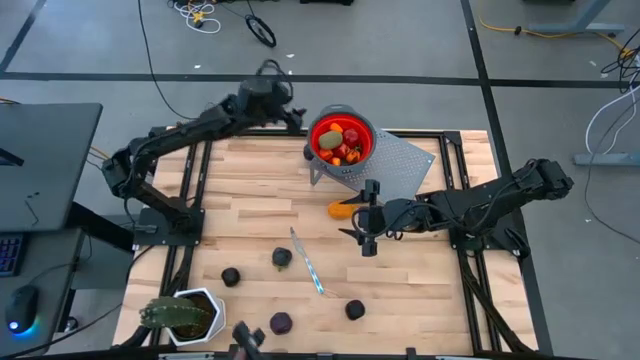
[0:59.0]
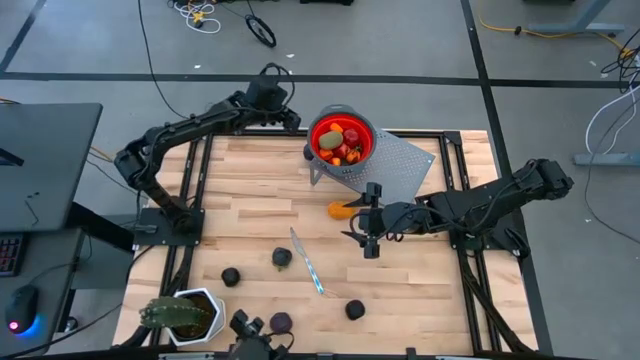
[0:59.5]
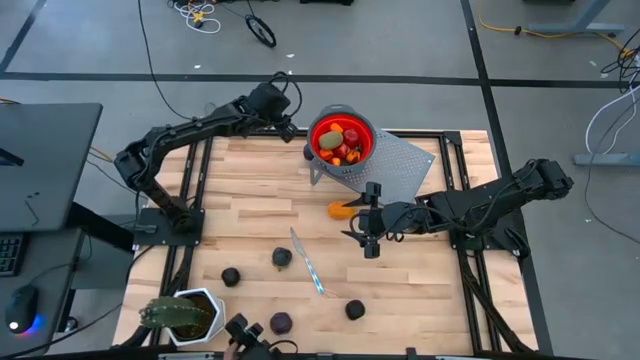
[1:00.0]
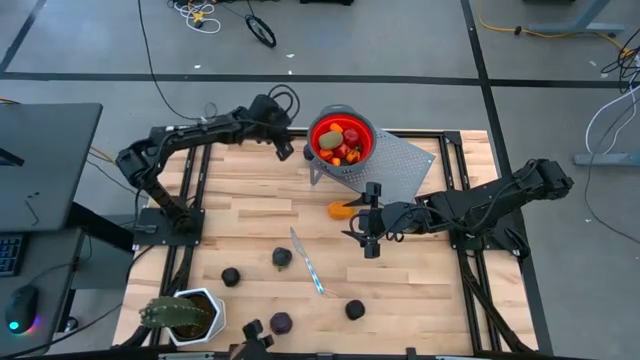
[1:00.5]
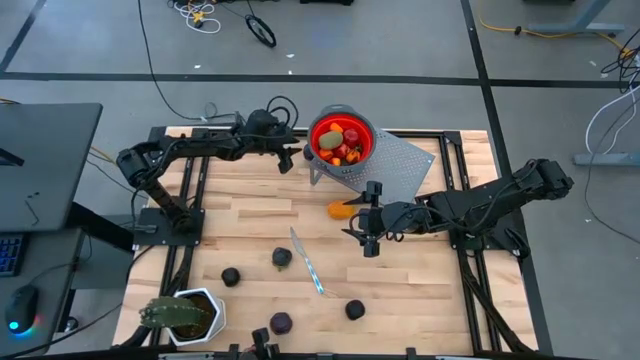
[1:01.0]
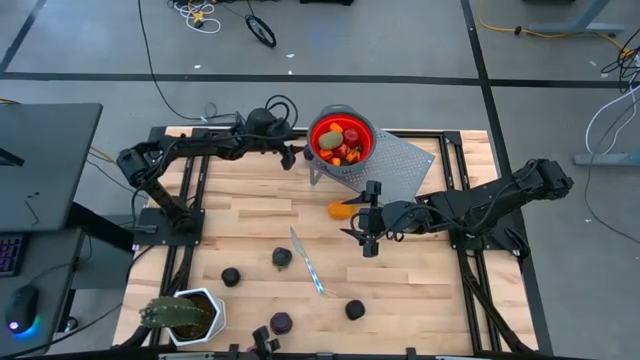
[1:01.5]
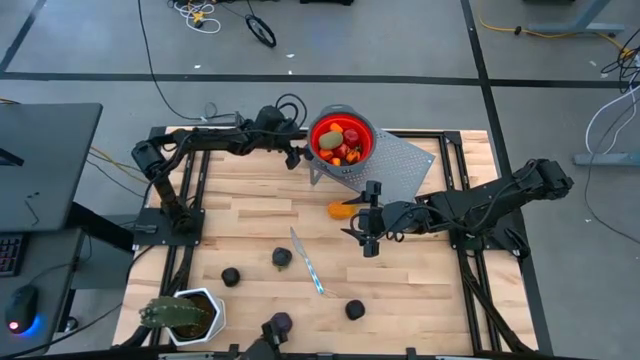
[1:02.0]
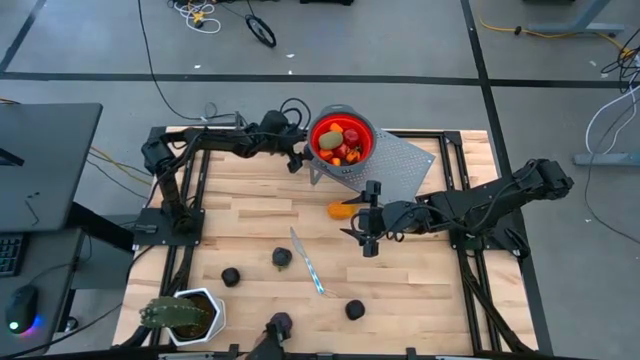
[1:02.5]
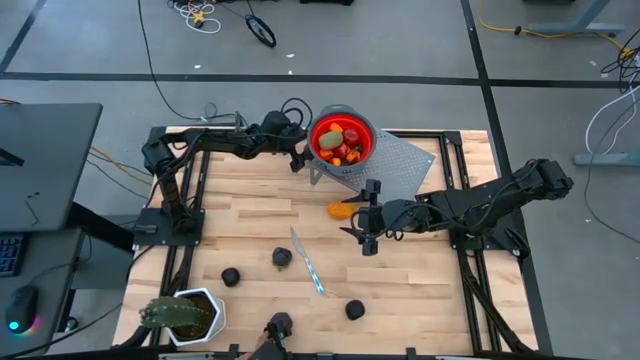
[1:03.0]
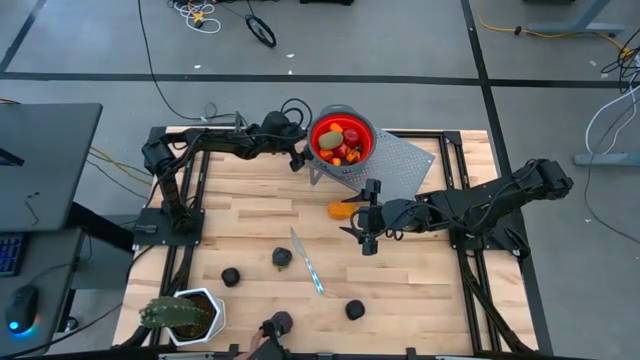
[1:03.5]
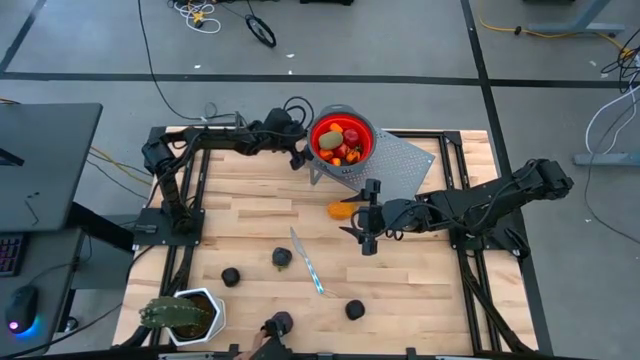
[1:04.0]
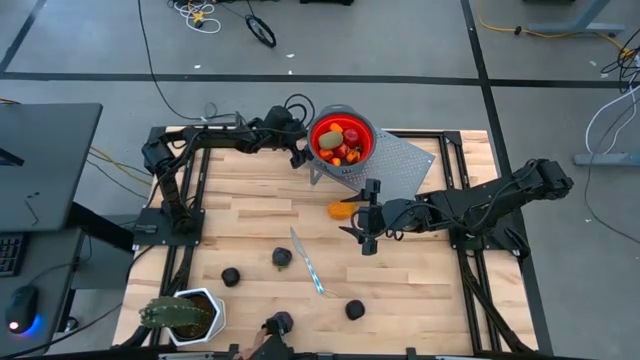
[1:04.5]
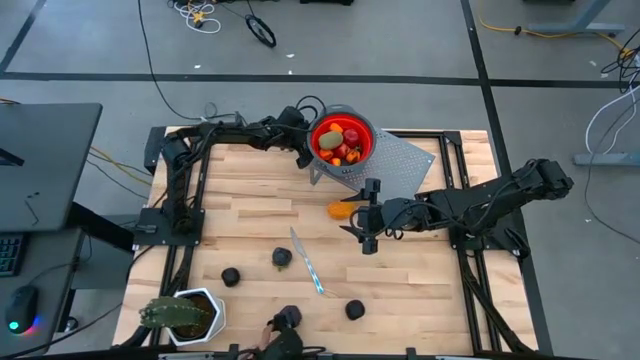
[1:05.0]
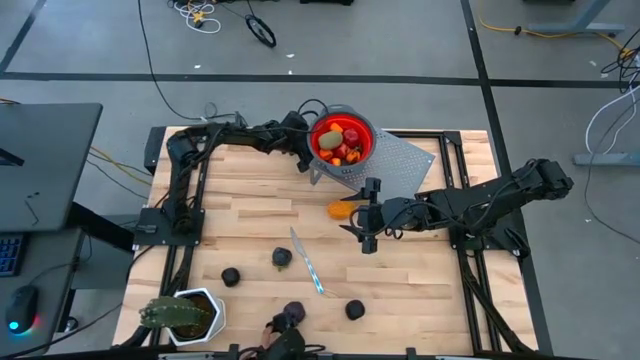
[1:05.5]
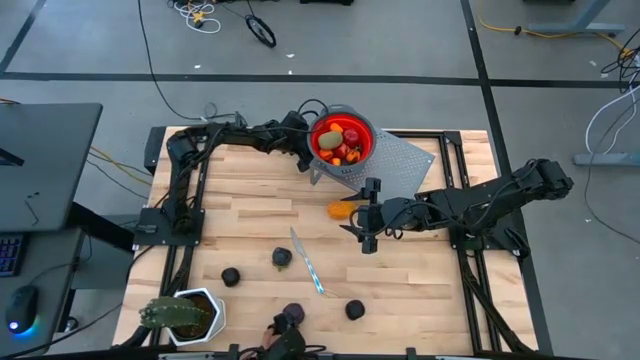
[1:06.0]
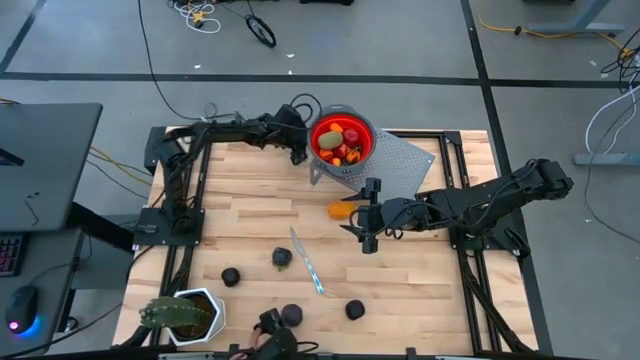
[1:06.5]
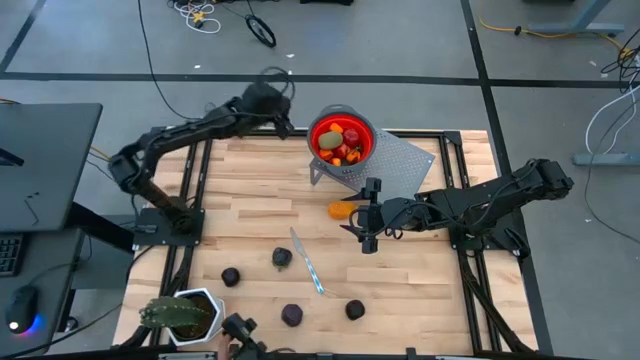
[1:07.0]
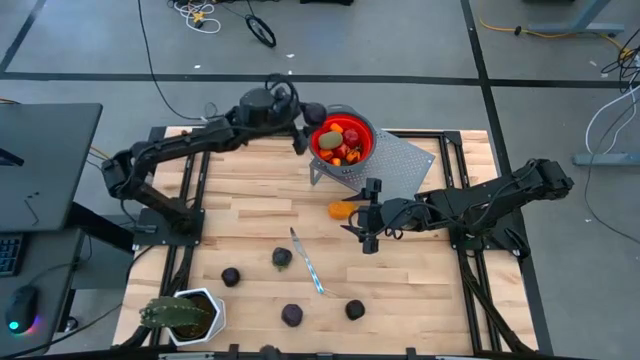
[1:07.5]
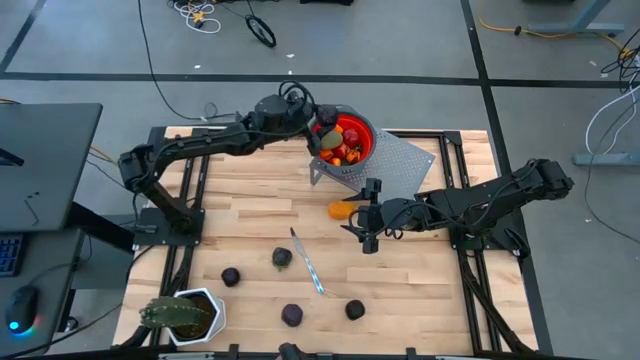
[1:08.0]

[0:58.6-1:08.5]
Task: Pick & Place Fruit
Put the mangosteen into the red strainer bowl

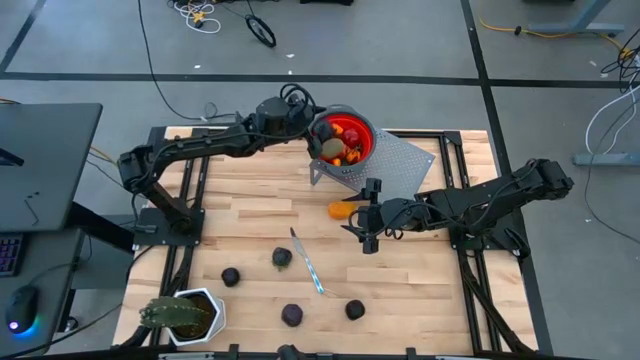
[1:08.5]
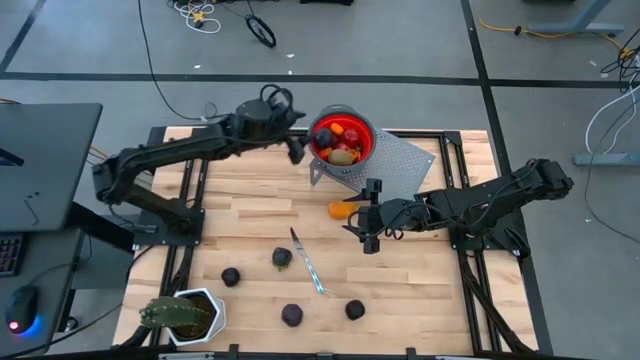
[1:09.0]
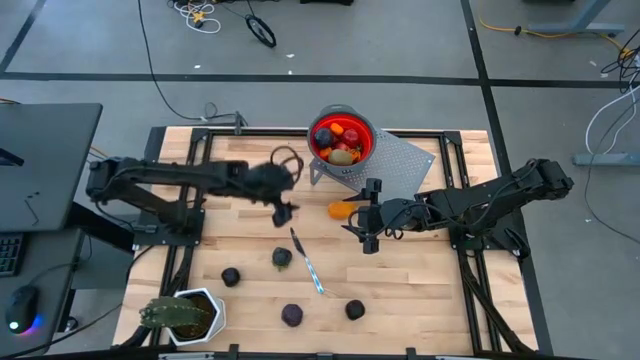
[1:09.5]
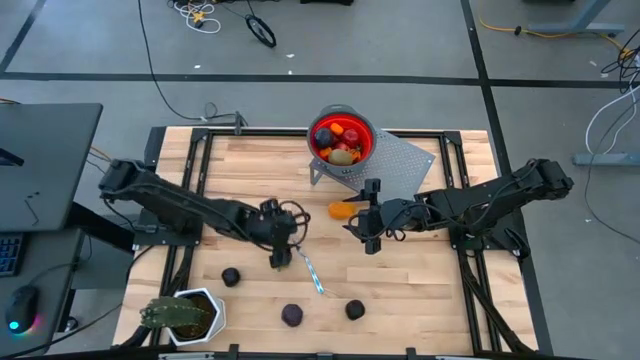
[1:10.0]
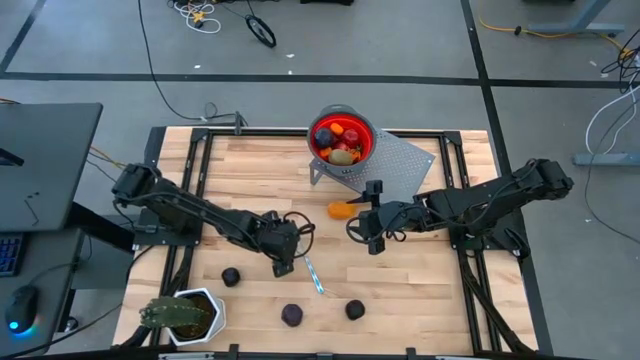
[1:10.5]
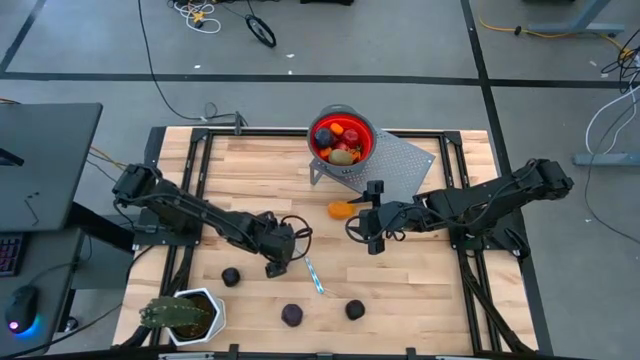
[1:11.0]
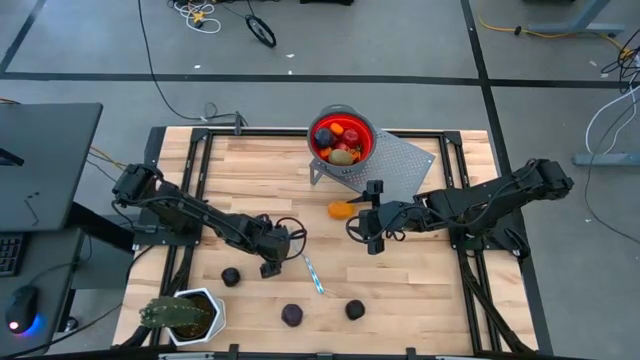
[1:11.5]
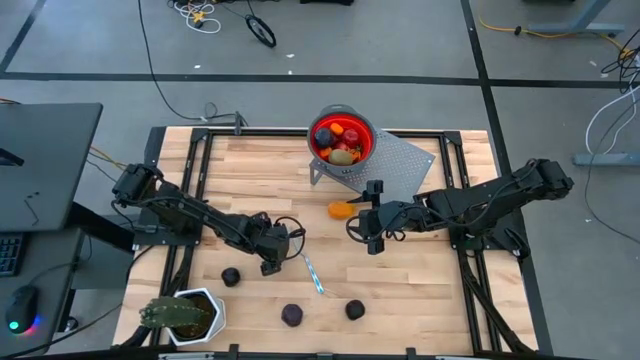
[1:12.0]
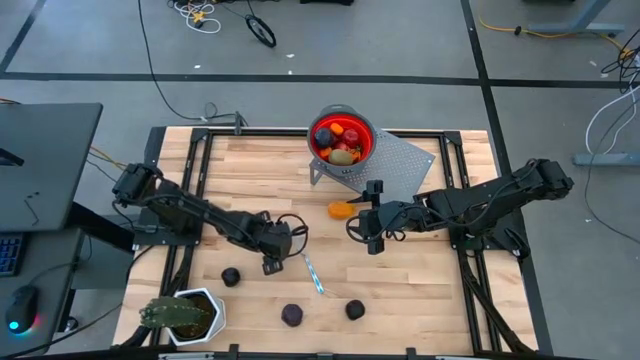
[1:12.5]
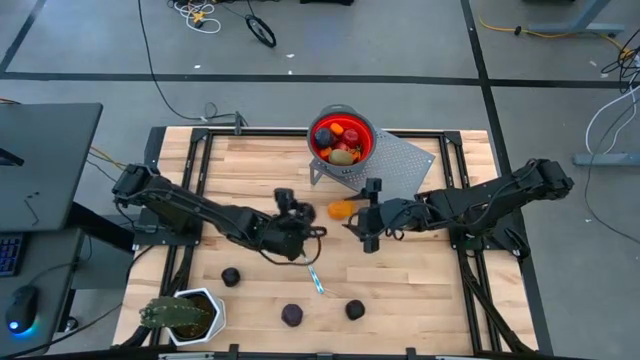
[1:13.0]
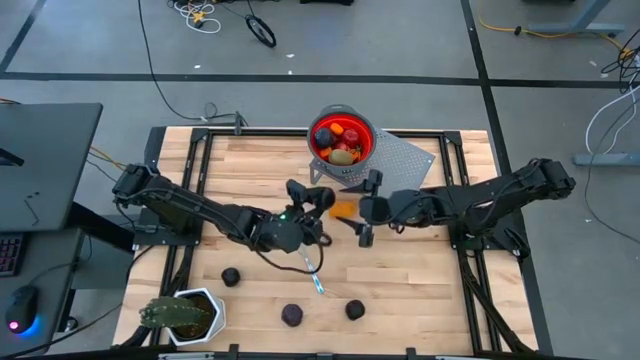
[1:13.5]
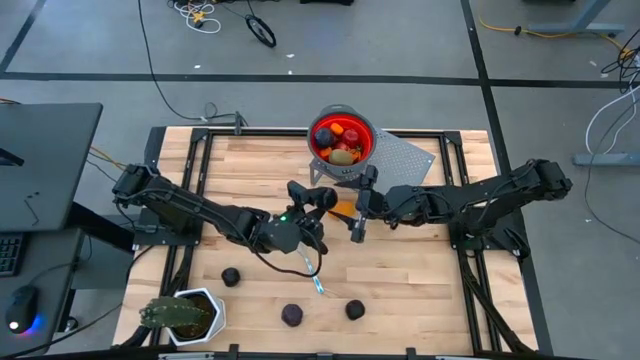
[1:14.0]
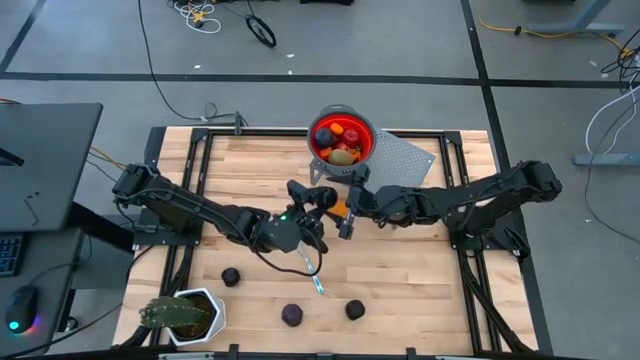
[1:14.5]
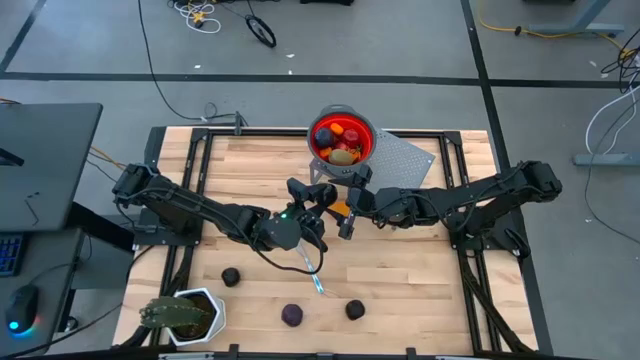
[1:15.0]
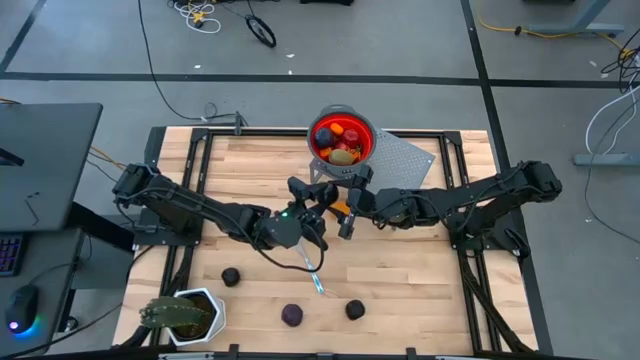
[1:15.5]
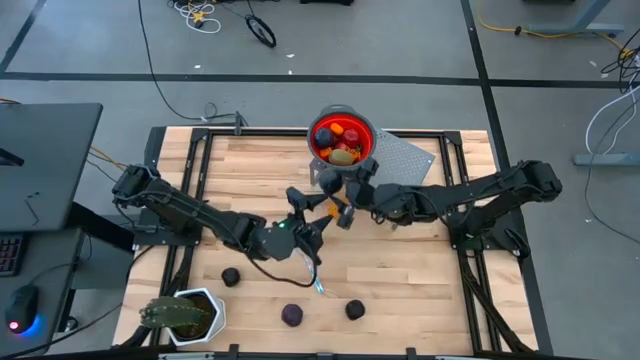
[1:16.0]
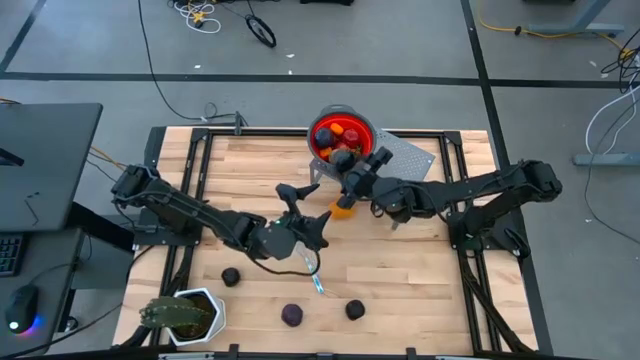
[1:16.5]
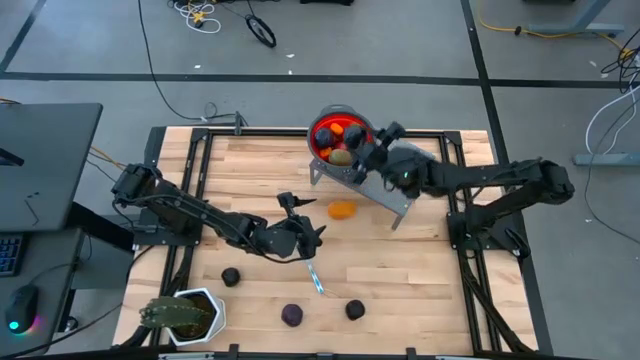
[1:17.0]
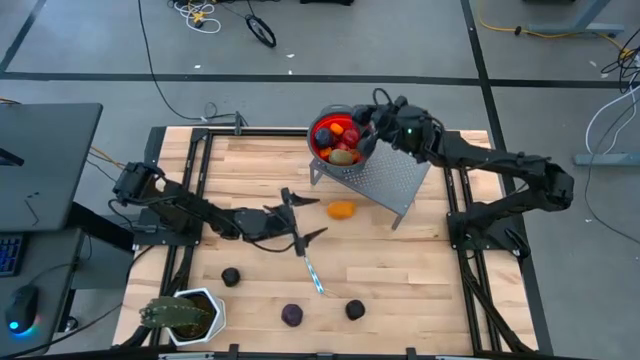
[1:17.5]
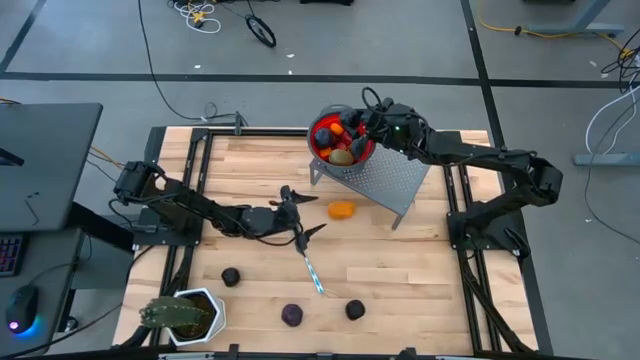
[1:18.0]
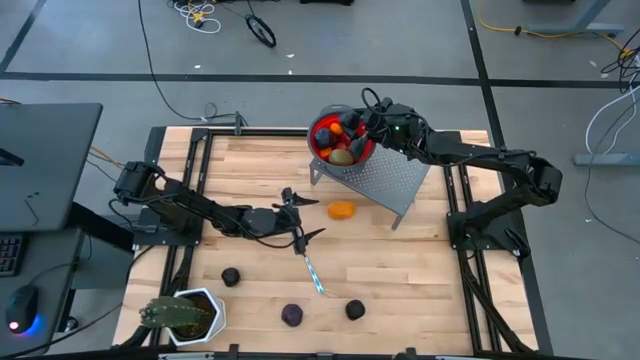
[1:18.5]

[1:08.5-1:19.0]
Put the mangosteen into the red strainer bowl

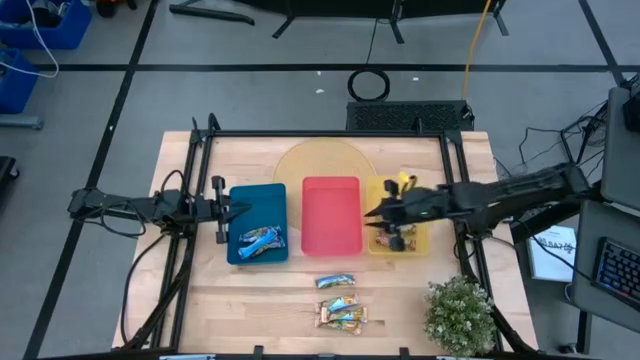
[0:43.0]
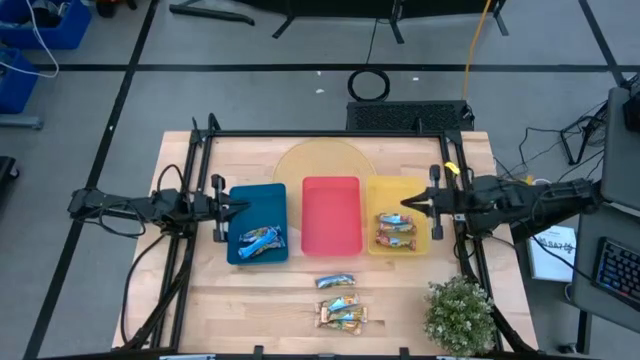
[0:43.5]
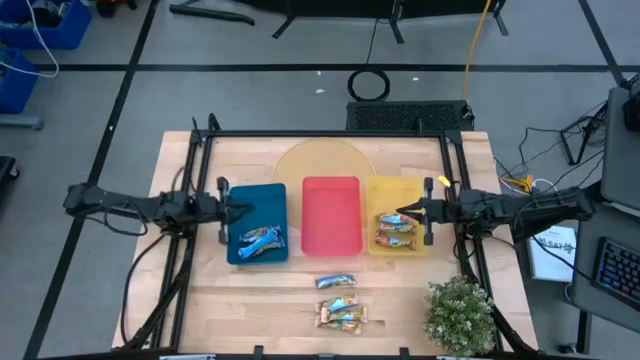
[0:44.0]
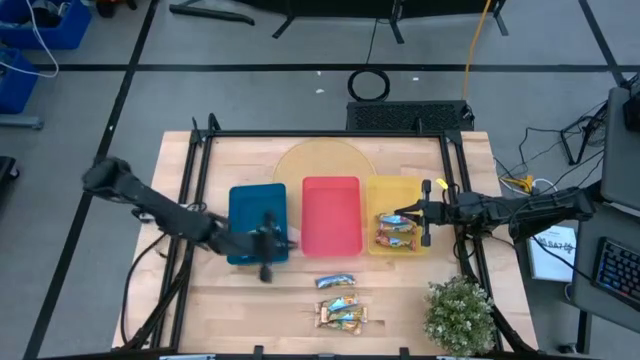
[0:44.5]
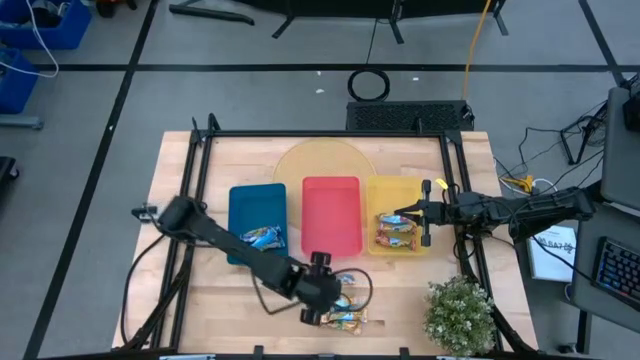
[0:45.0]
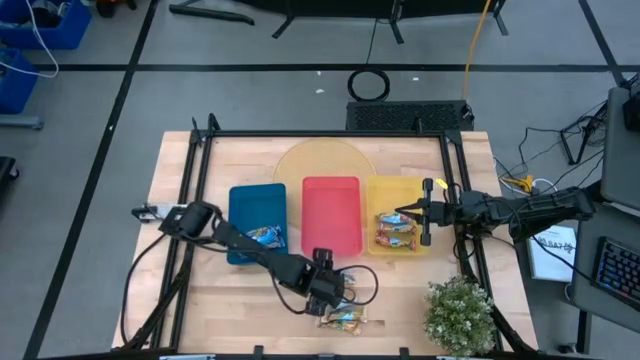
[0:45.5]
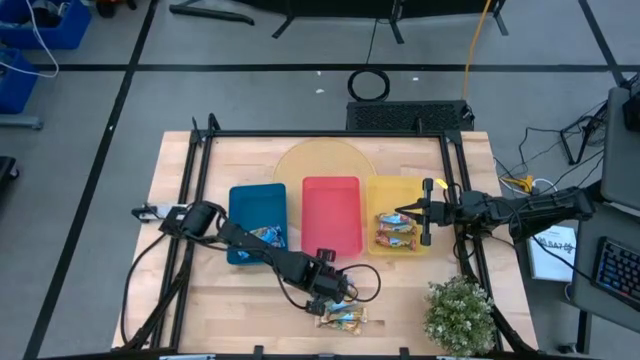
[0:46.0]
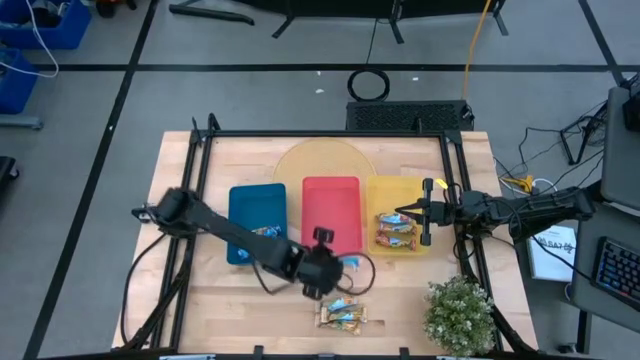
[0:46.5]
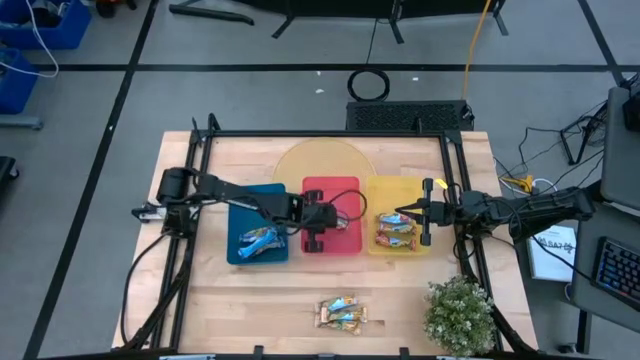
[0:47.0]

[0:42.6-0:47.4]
Task: Pick and place Granola Bars by type
Put the top yellow granola bar into the red bin
